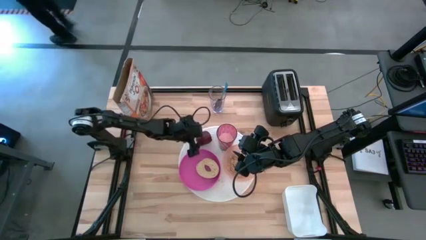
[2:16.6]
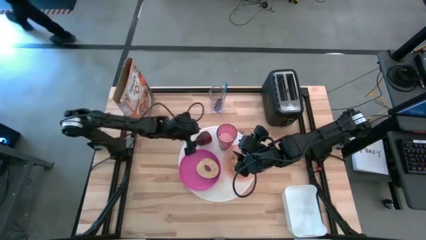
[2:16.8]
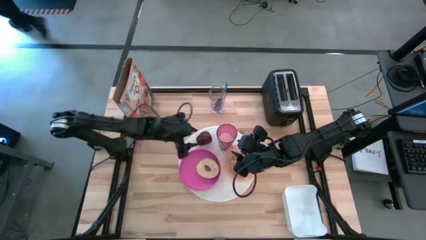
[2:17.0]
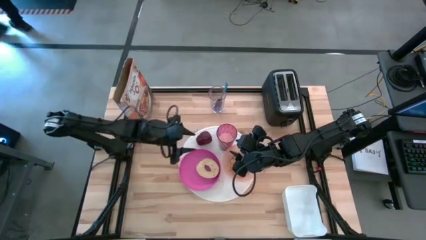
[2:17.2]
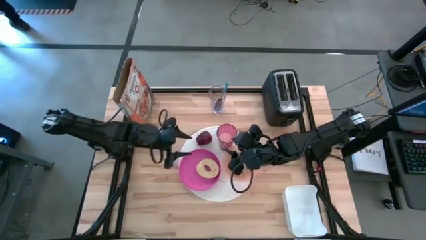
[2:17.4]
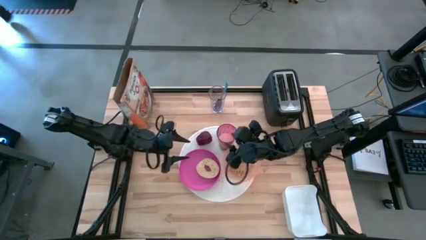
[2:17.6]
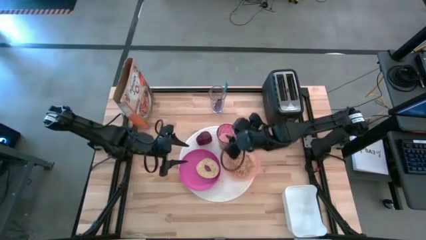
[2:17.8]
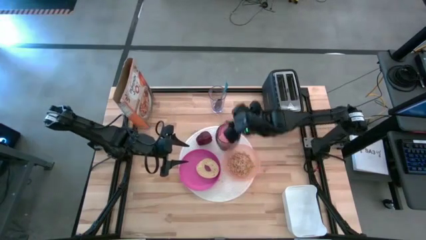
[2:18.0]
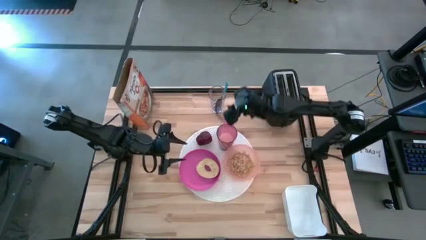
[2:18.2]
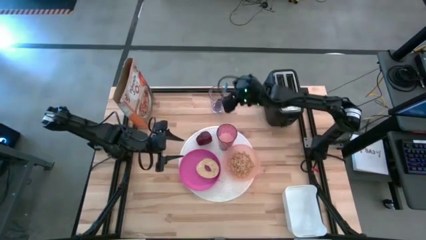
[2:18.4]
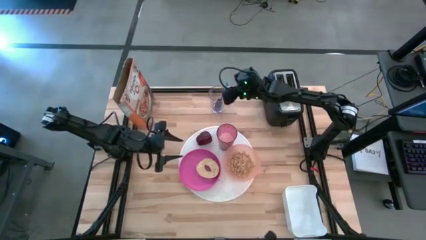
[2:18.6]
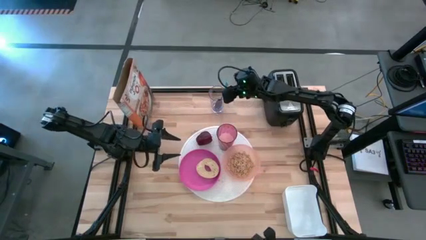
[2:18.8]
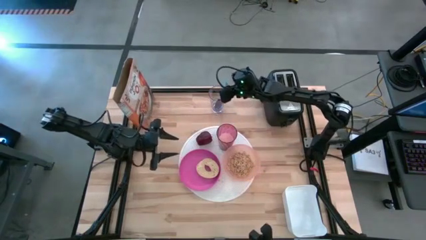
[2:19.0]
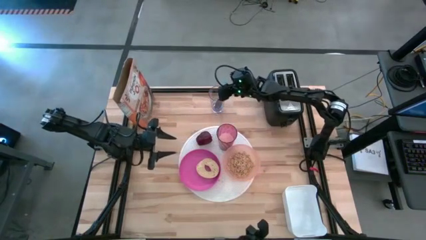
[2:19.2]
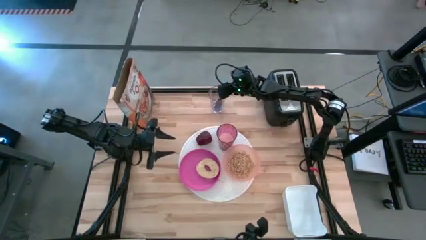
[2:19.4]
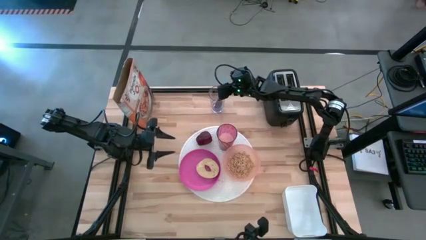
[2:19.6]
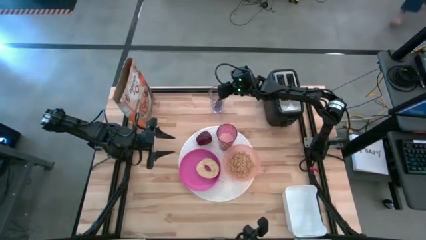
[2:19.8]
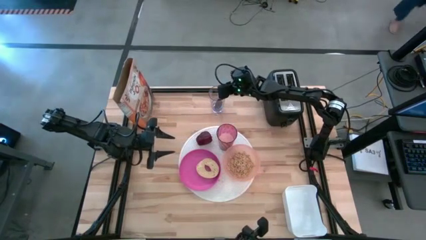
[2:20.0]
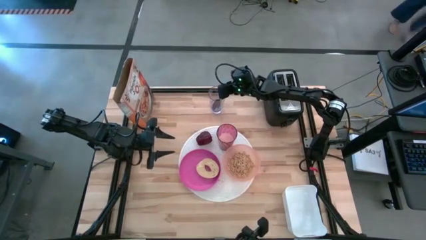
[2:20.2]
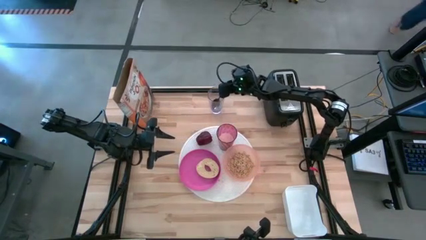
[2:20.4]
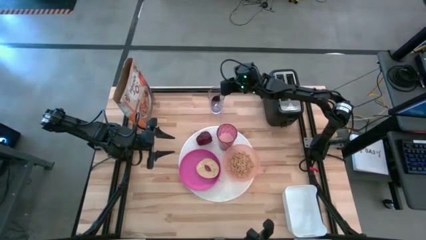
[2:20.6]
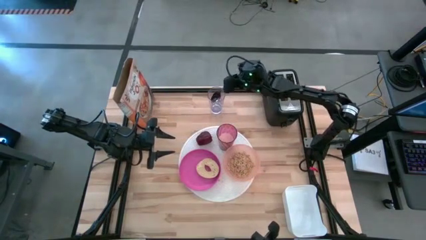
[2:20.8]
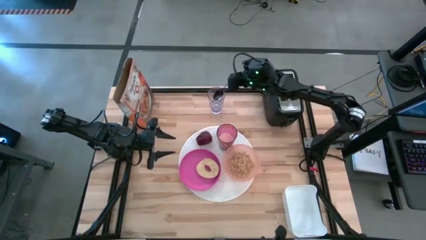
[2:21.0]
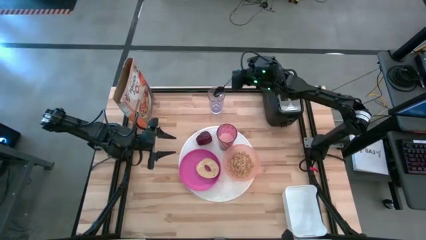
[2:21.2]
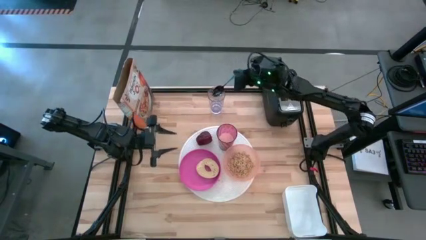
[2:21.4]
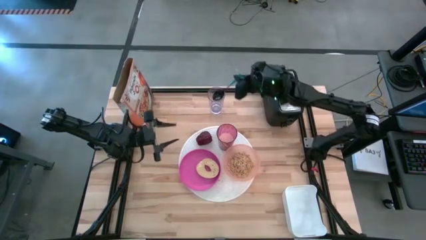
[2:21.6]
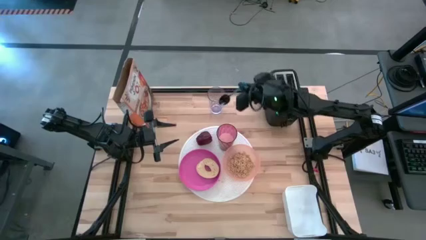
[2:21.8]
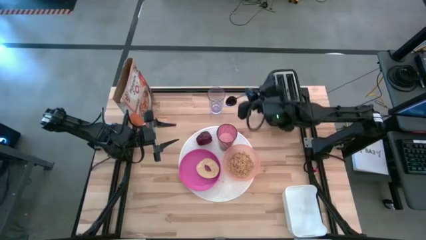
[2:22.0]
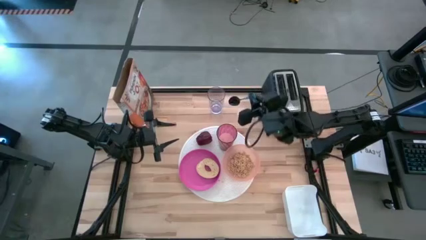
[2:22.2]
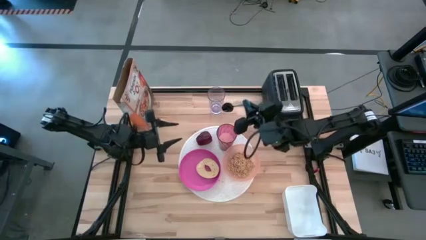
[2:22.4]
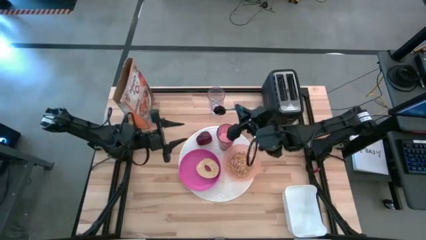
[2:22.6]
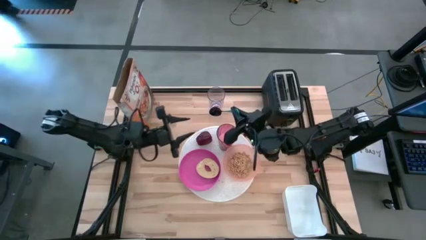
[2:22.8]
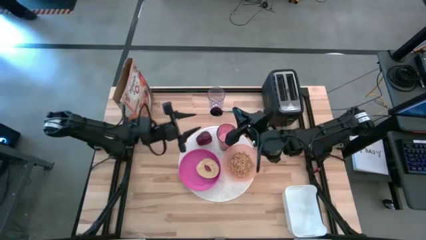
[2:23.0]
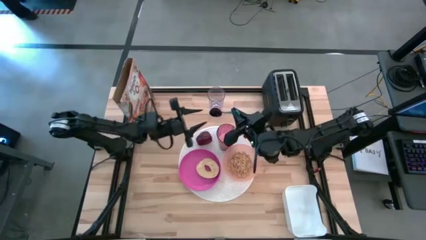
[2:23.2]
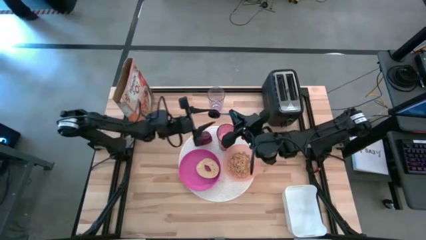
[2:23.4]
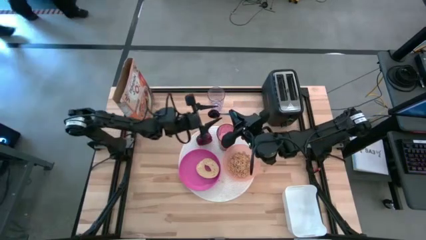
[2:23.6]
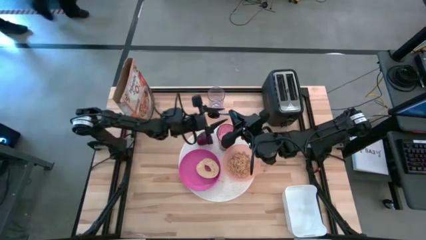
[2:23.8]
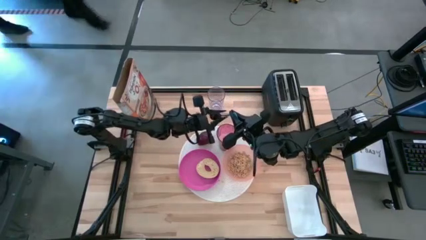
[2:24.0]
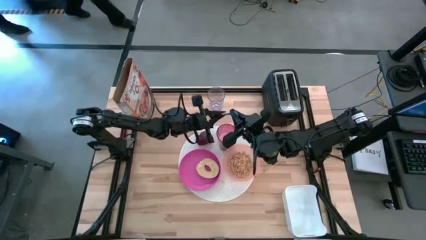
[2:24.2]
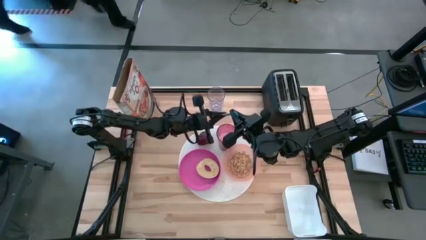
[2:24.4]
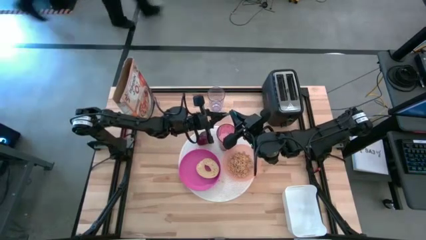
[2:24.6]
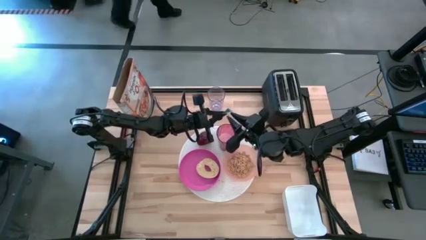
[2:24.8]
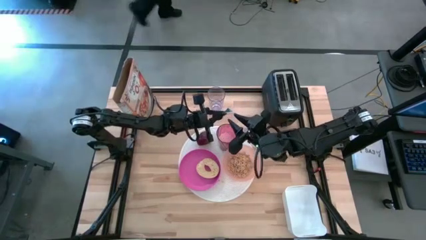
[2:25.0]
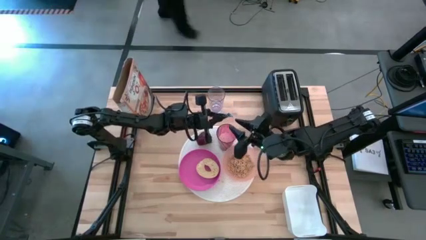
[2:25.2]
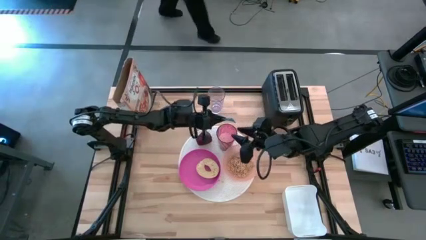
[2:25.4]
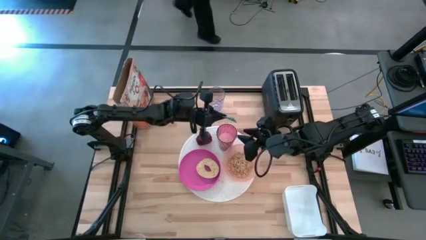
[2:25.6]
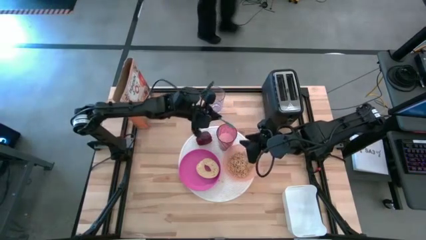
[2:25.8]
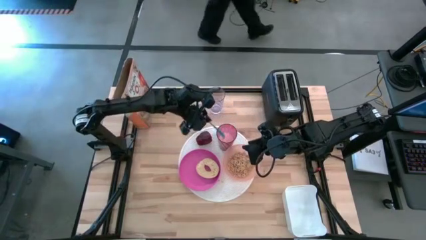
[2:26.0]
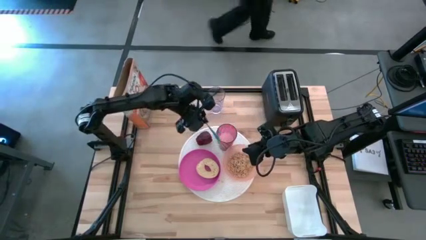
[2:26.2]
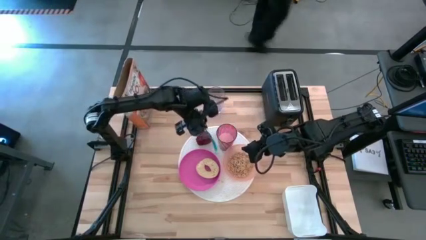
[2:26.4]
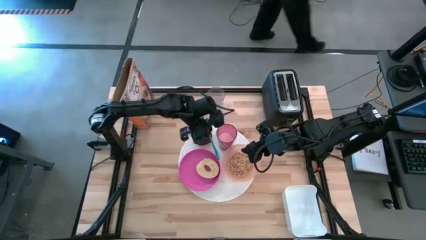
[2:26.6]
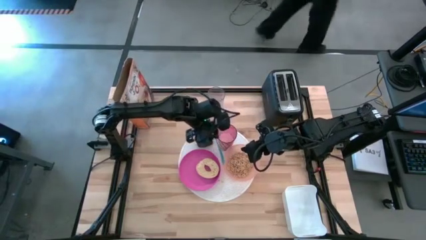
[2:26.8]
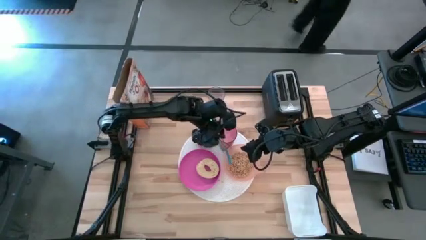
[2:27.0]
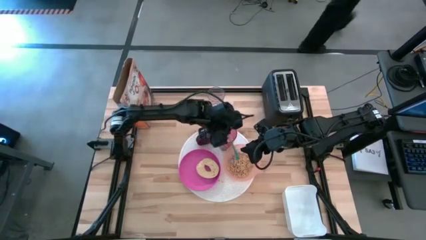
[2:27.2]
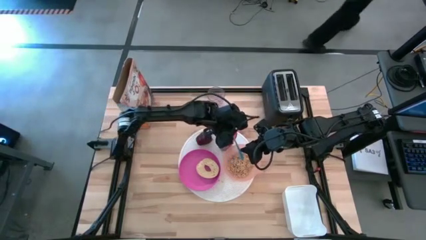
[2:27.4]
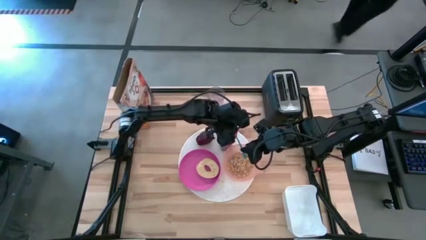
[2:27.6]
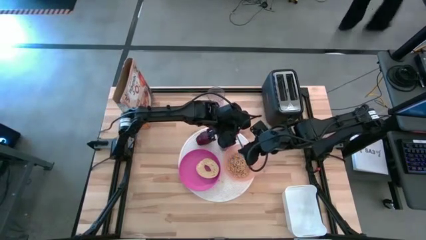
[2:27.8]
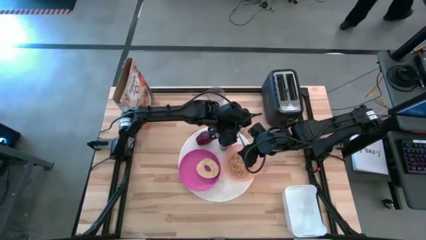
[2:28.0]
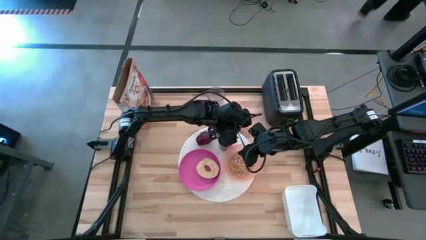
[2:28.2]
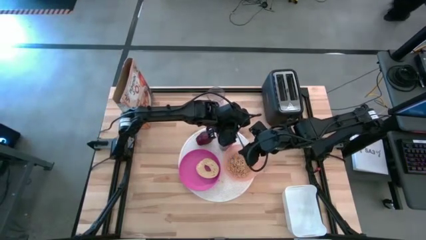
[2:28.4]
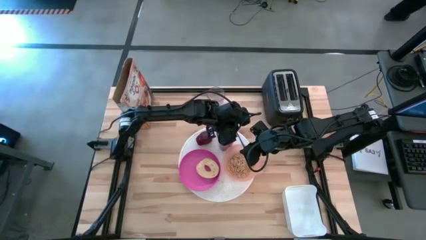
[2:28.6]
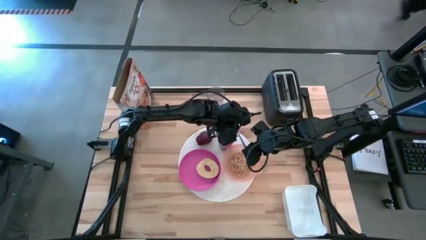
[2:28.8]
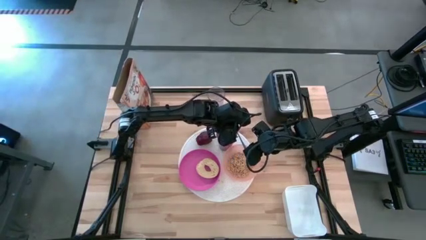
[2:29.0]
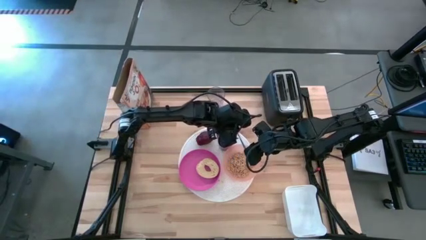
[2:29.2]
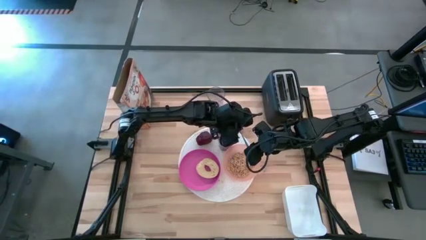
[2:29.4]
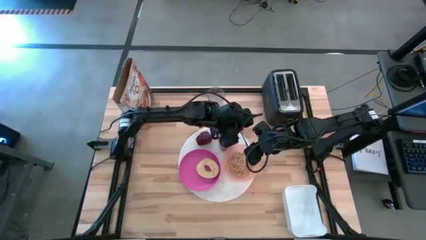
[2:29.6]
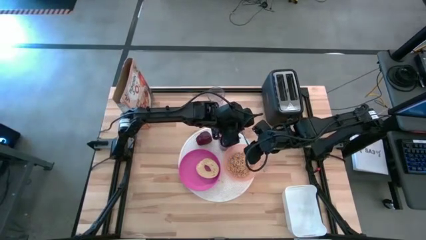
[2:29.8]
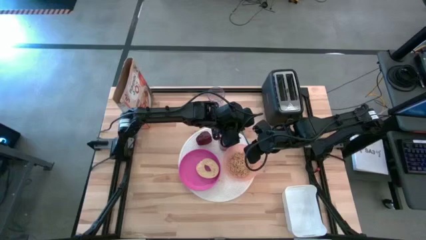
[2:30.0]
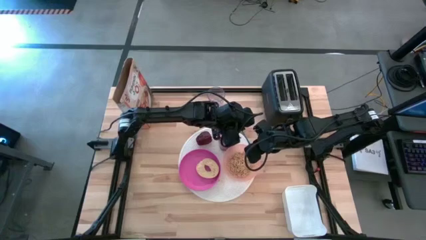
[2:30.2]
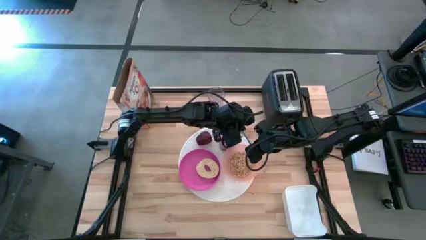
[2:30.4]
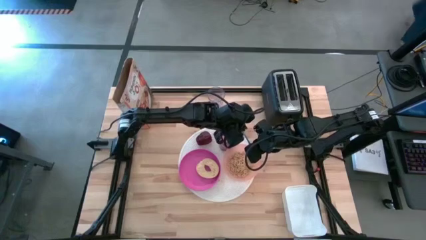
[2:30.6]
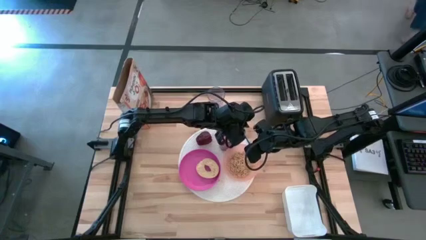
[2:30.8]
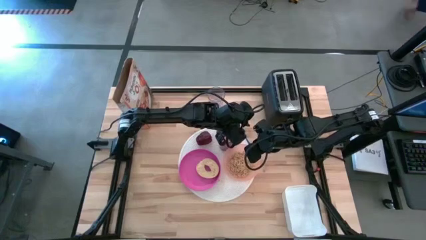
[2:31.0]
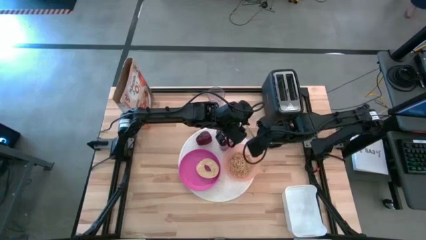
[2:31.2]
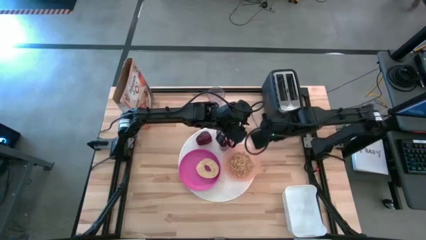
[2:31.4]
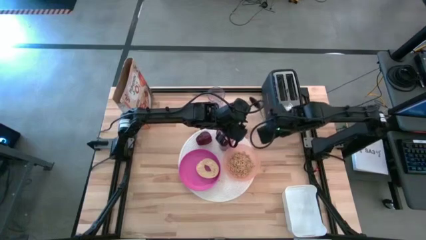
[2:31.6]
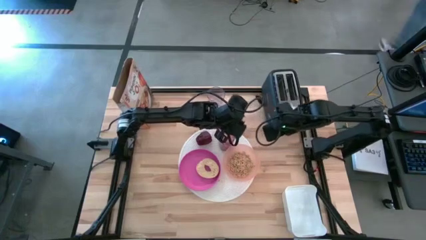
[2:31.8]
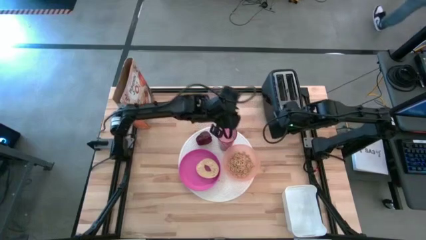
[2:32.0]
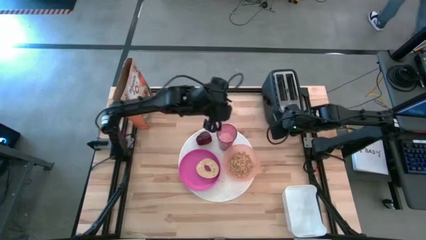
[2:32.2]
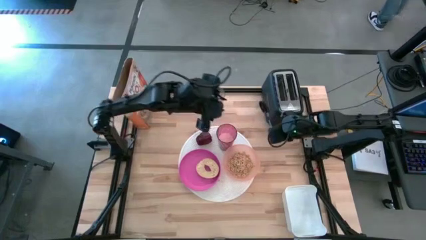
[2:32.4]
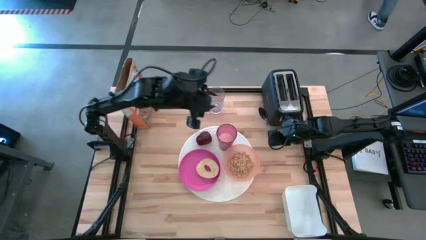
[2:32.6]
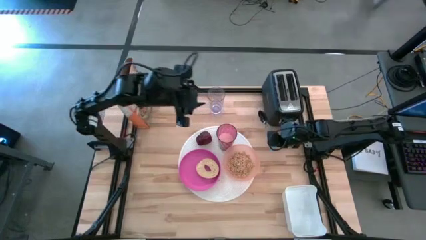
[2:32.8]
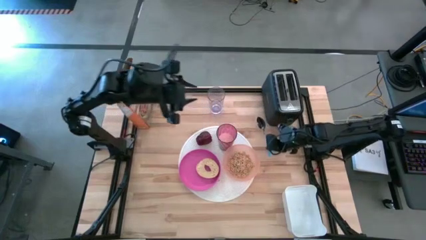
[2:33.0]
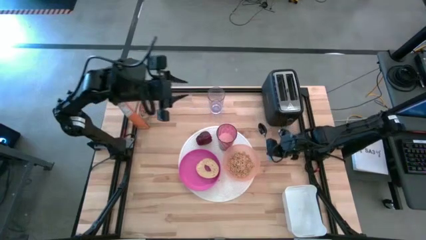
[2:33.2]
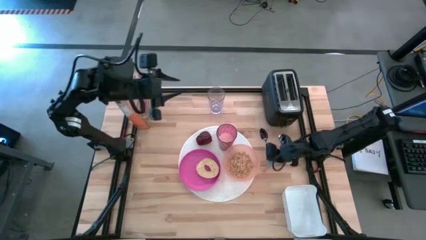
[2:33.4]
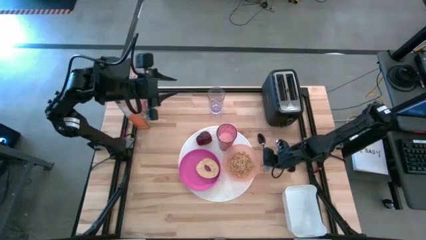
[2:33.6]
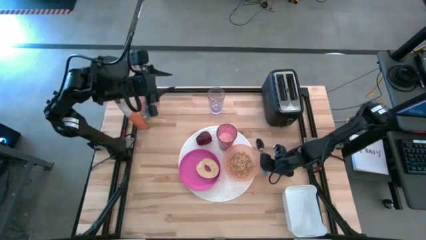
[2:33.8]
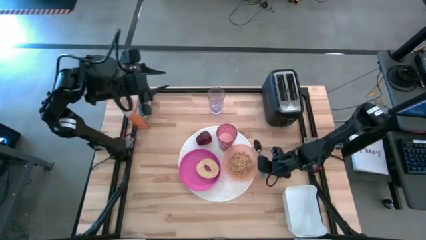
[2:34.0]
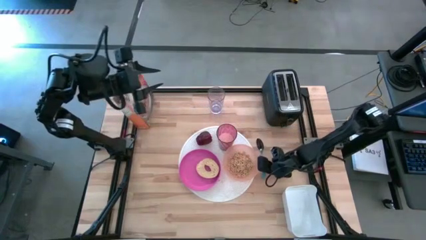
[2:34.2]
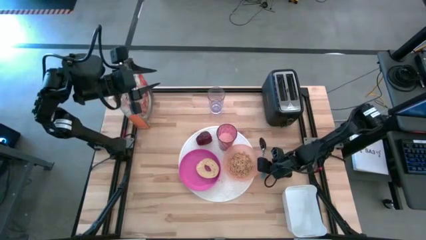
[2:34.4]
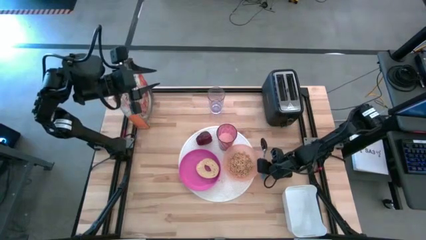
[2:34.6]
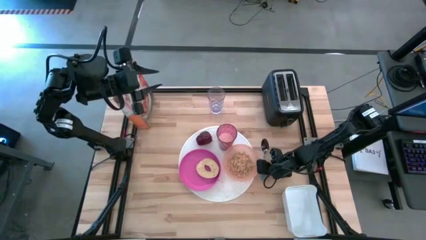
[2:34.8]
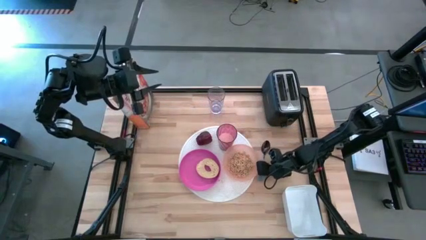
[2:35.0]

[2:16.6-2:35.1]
Task: Arrange a breakfast setting
Put the blue spoon to the right of the white tablemat
